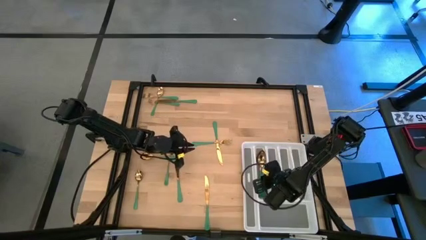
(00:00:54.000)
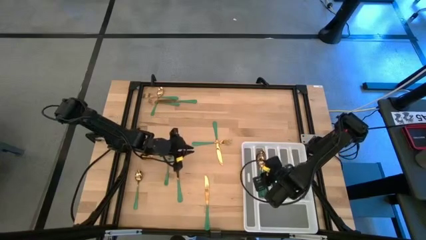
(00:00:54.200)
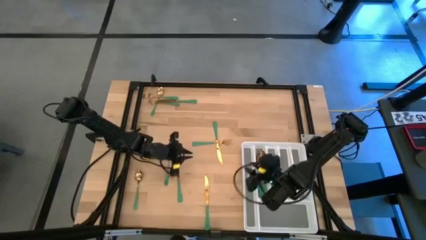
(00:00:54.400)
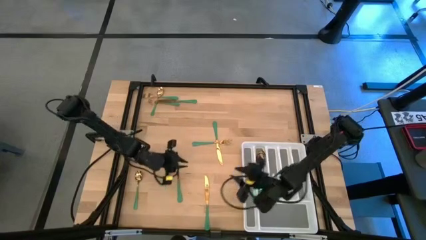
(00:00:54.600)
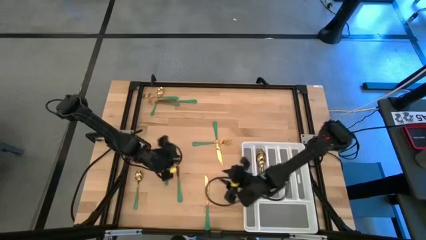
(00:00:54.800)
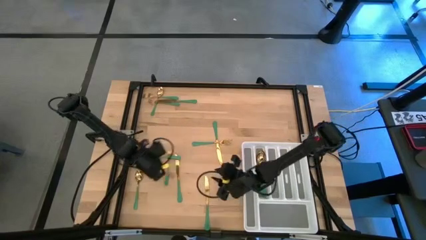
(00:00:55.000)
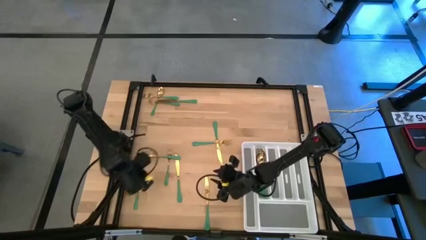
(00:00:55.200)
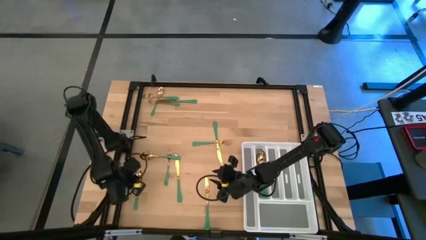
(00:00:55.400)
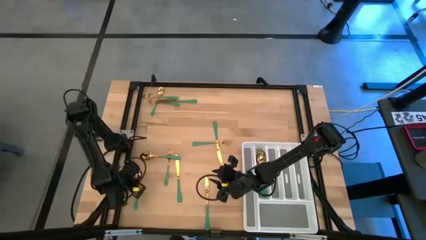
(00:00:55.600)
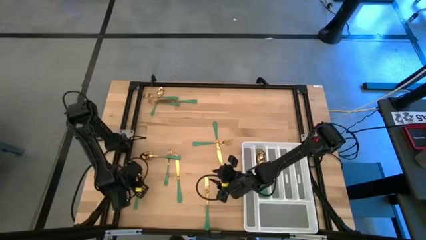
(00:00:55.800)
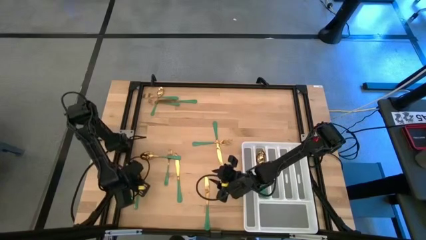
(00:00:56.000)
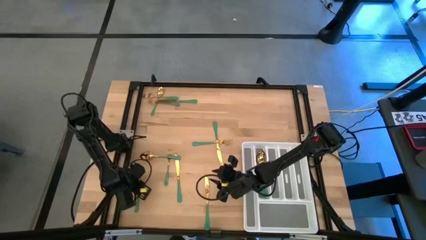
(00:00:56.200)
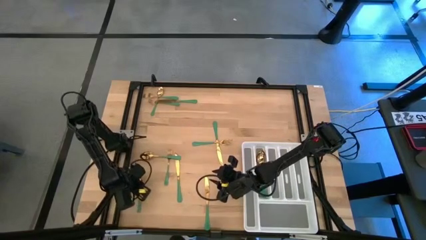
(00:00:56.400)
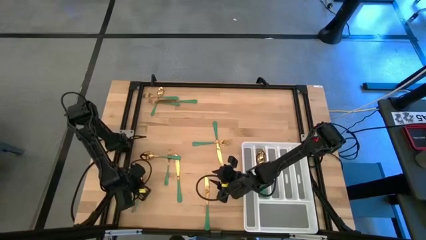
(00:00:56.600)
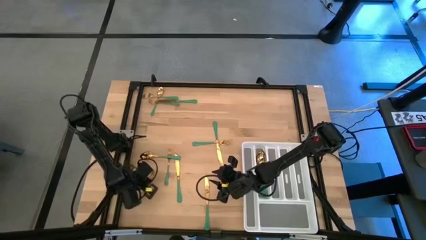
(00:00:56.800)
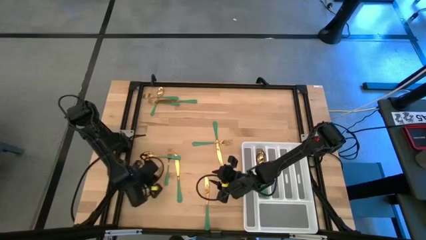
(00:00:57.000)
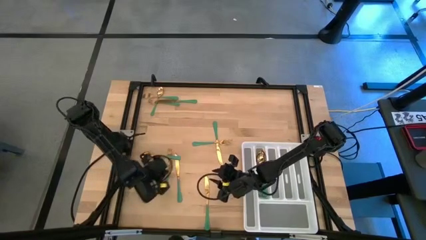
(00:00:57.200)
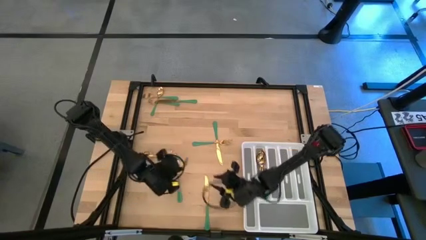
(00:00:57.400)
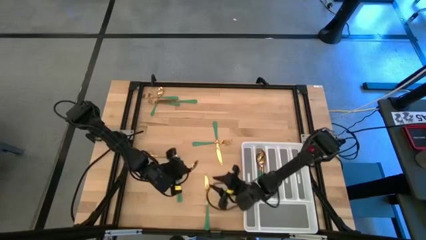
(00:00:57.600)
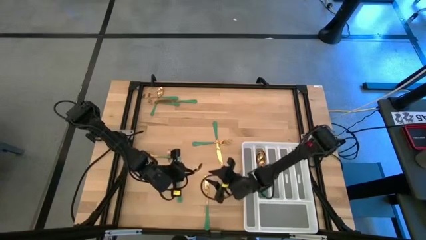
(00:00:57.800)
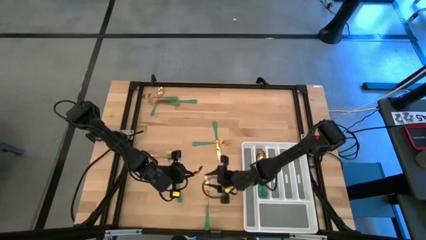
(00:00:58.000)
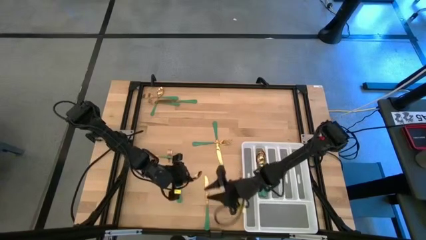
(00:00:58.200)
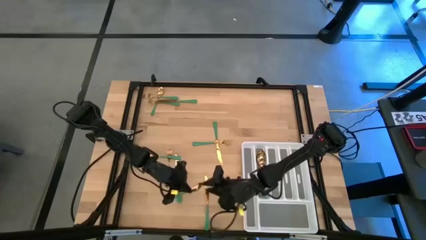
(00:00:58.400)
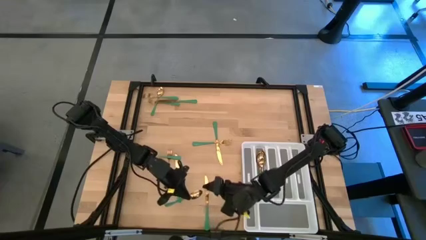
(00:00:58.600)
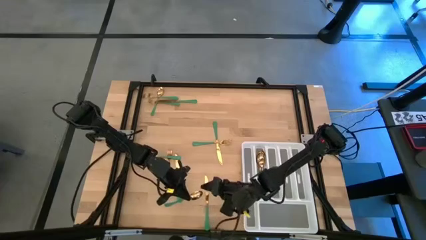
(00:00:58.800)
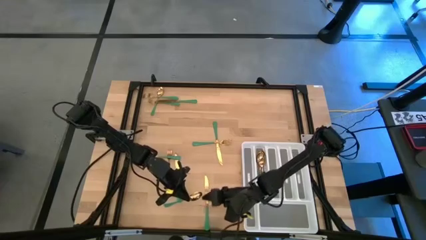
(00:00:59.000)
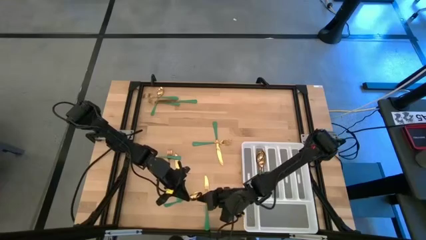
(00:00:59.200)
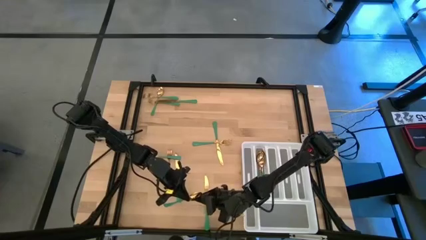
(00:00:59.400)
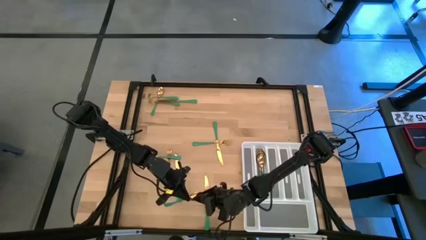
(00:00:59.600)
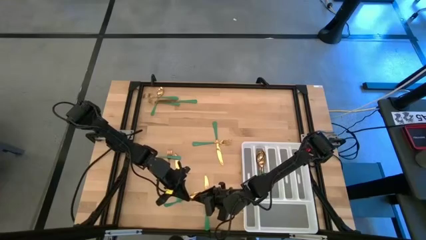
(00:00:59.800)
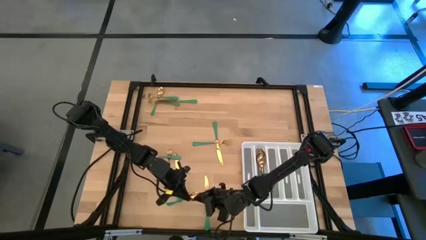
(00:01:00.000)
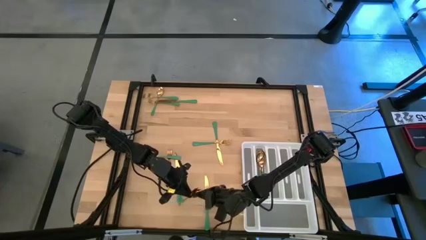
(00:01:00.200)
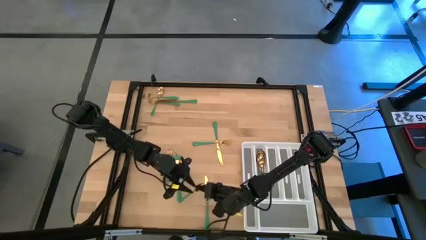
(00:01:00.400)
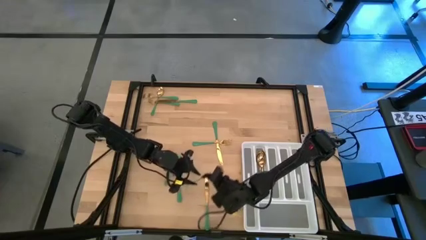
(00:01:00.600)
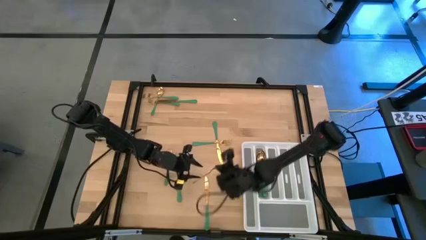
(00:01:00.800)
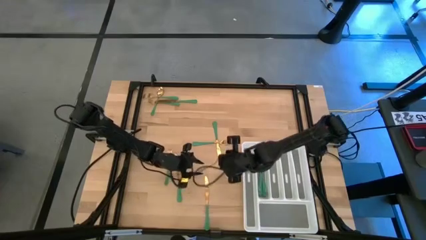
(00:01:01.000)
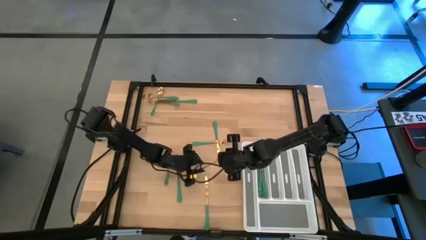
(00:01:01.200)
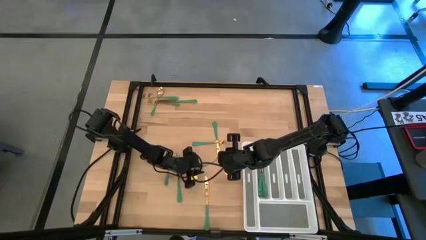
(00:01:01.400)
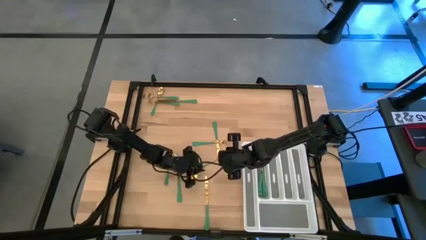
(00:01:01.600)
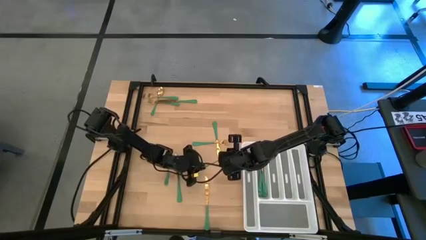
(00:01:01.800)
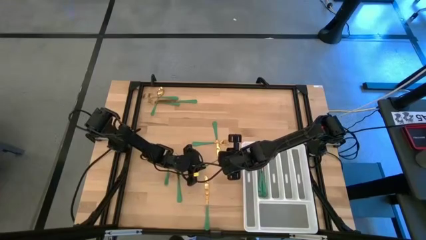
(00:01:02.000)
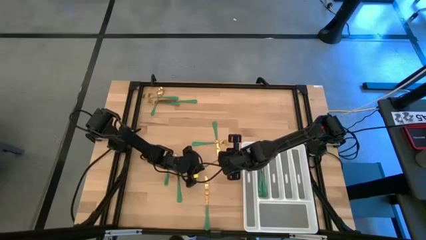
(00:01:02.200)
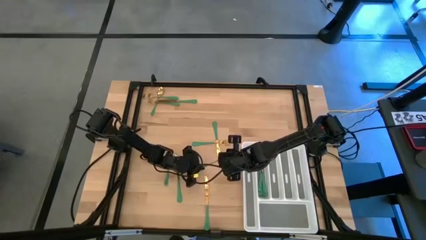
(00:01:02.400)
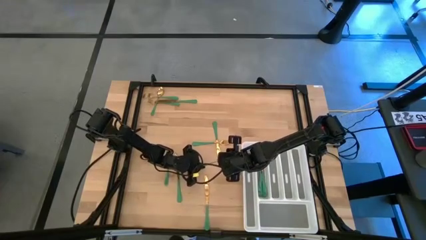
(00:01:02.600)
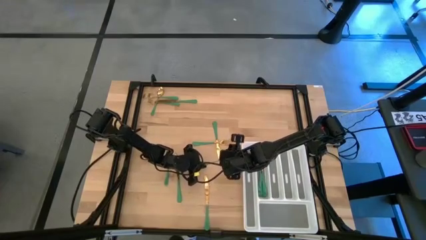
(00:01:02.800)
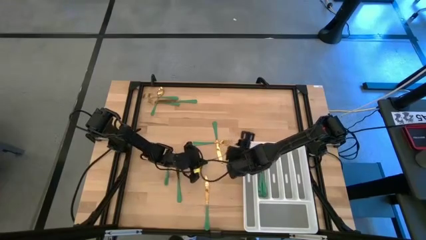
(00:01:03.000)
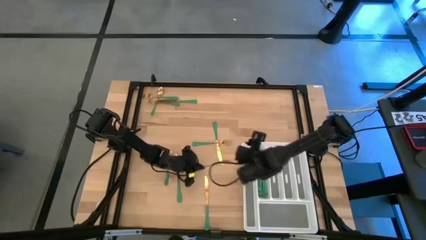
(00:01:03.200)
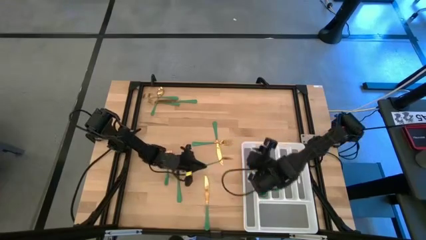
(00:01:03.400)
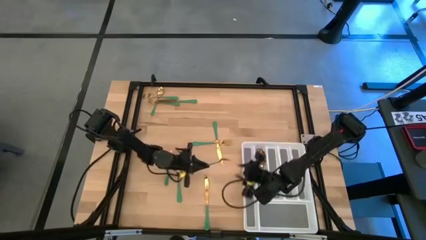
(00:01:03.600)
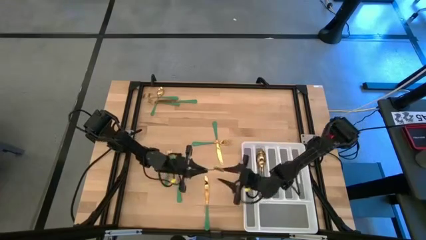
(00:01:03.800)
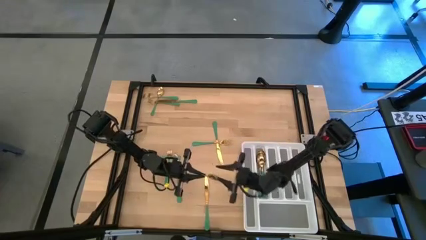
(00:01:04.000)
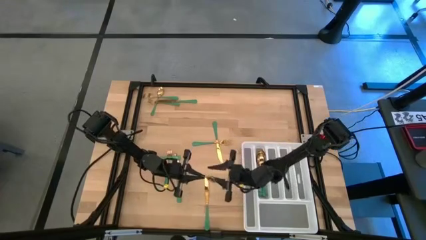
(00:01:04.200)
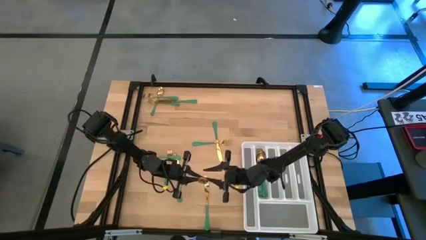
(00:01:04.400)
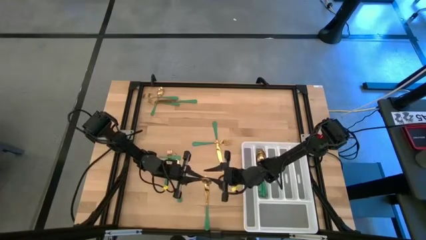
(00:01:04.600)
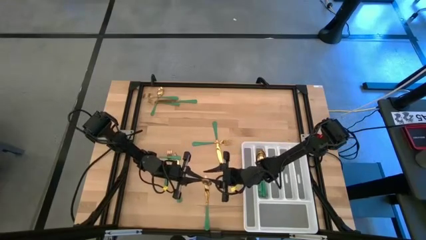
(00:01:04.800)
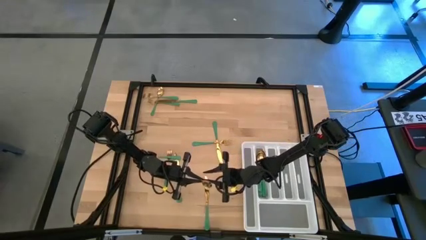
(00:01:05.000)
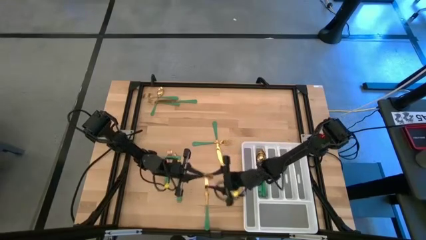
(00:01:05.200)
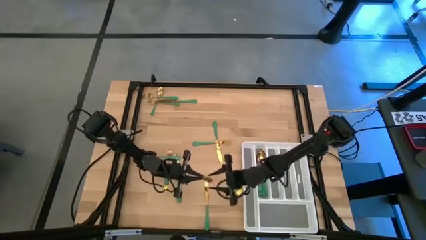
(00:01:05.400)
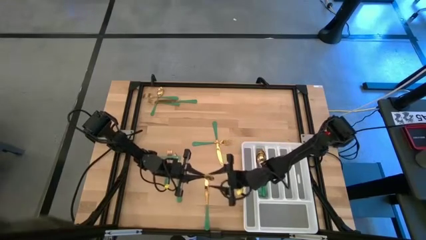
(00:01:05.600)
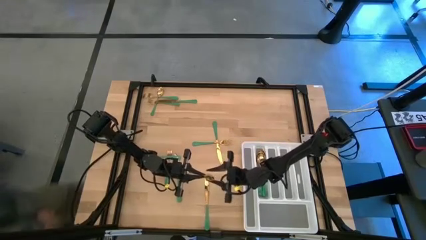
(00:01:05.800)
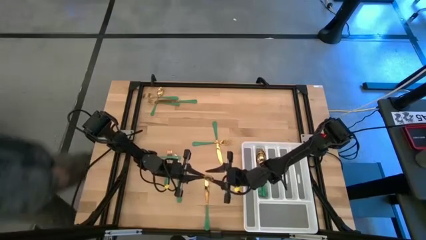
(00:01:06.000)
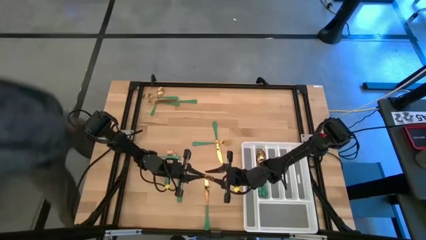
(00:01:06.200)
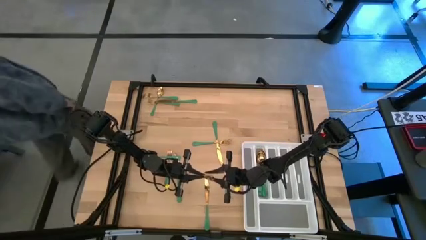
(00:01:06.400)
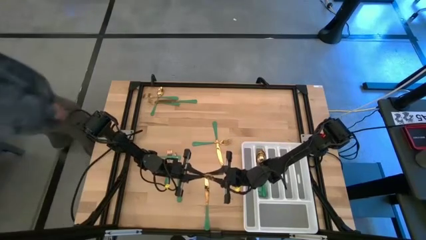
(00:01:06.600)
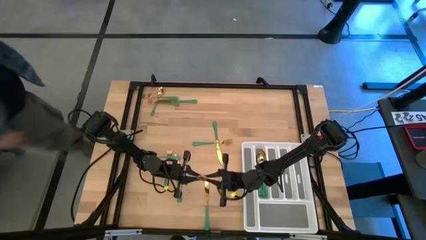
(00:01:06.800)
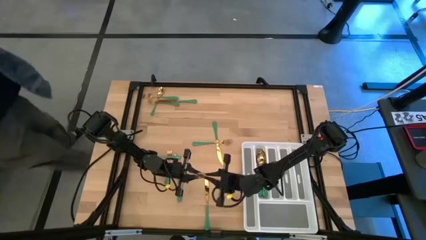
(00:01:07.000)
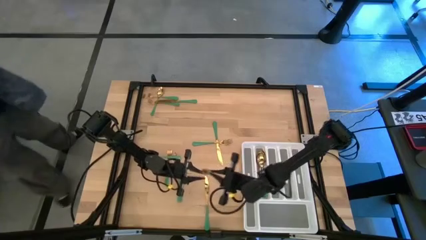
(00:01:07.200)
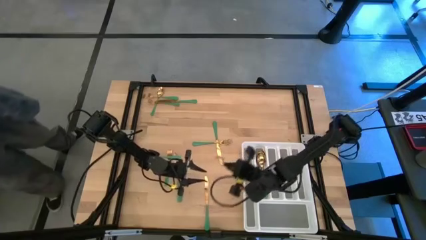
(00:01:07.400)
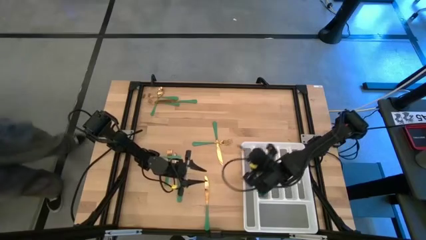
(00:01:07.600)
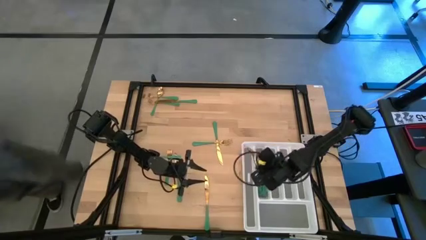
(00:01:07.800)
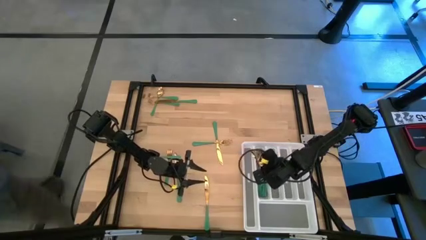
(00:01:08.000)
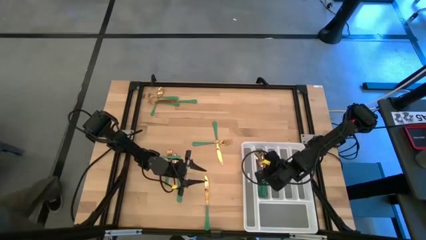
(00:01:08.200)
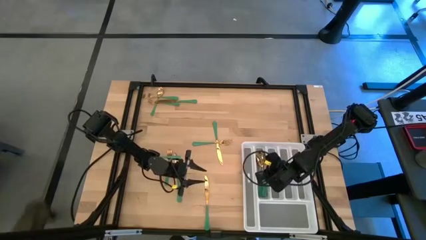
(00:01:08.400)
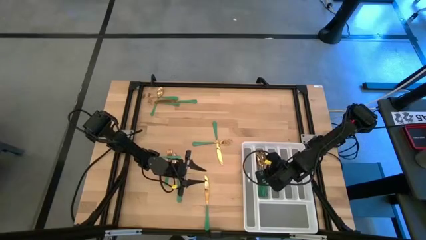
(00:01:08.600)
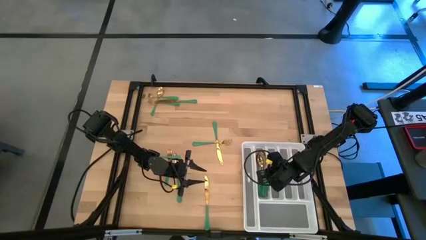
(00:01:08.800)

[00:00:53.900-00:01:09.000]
Task: Sort silverware
Put the bottom left green spoon into the silverware rack
